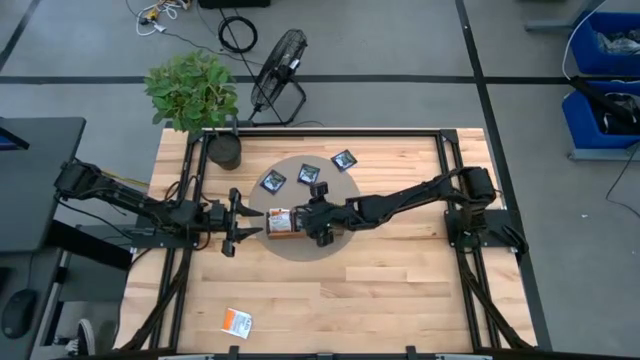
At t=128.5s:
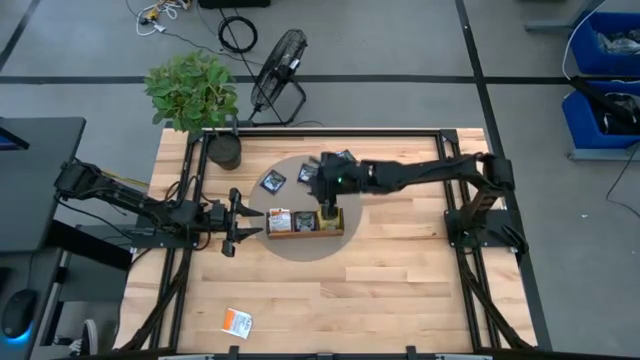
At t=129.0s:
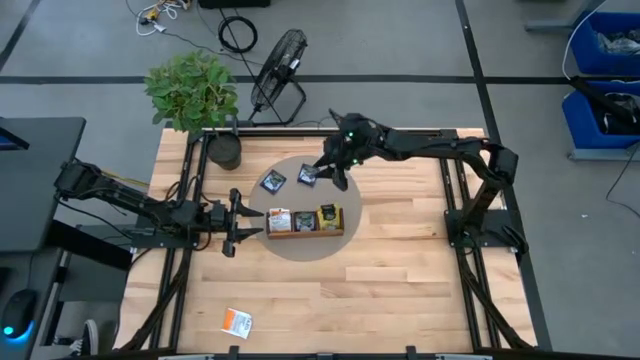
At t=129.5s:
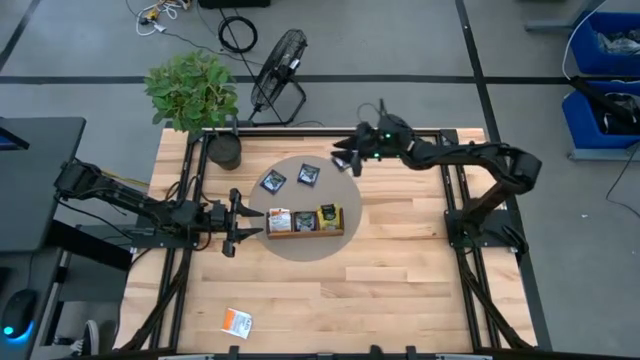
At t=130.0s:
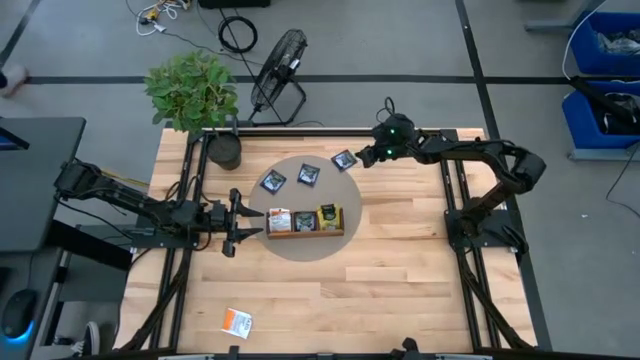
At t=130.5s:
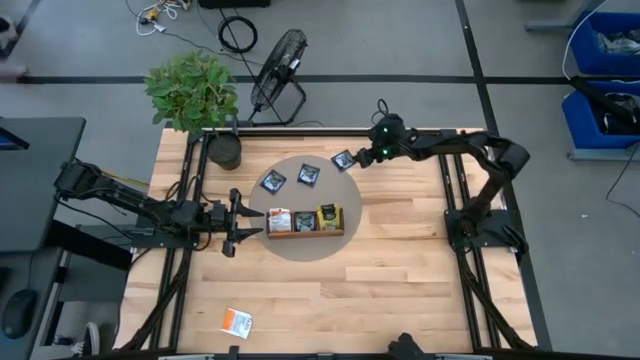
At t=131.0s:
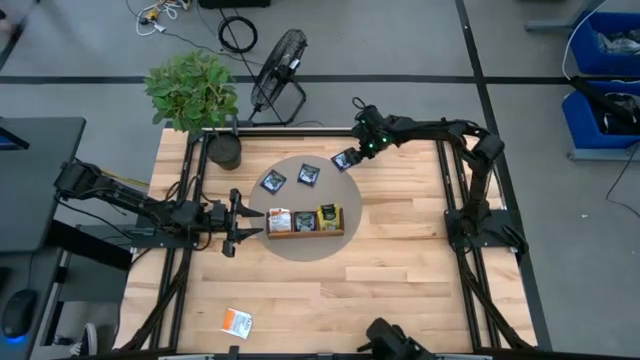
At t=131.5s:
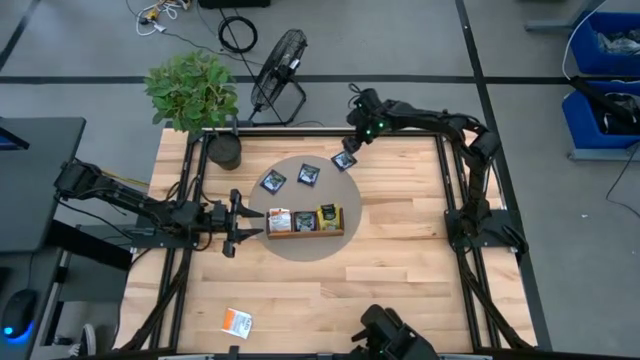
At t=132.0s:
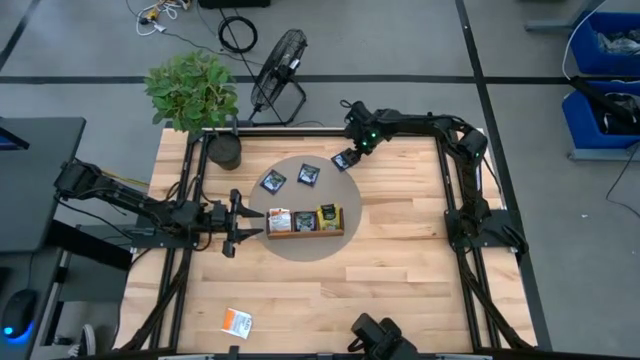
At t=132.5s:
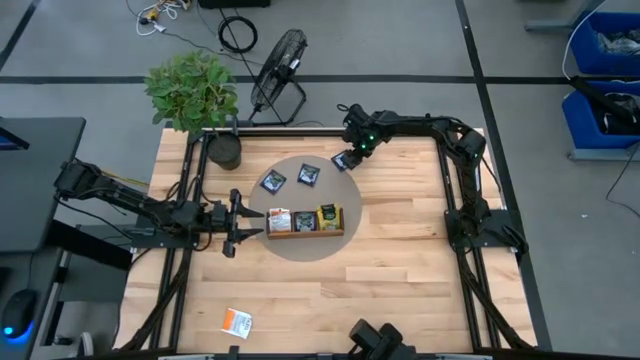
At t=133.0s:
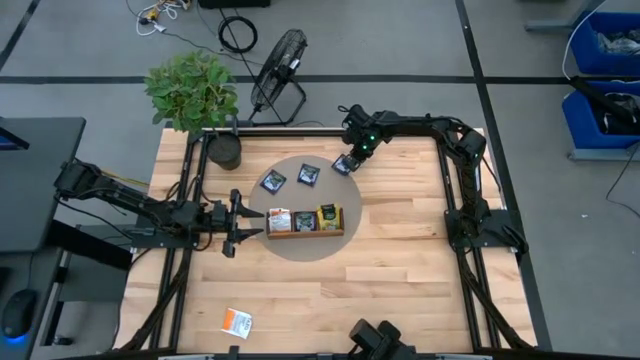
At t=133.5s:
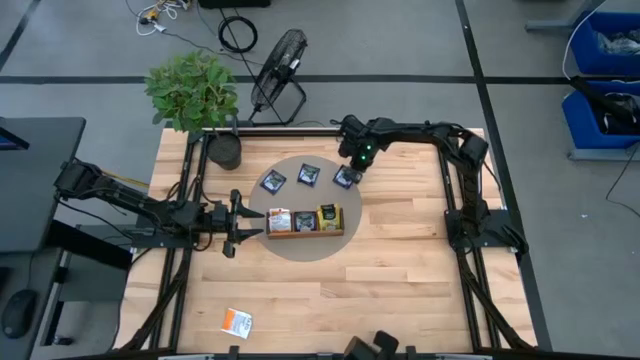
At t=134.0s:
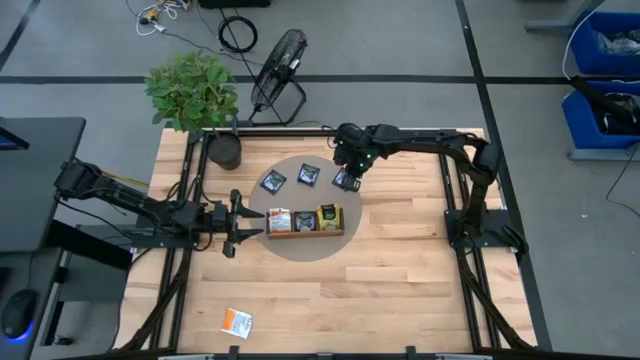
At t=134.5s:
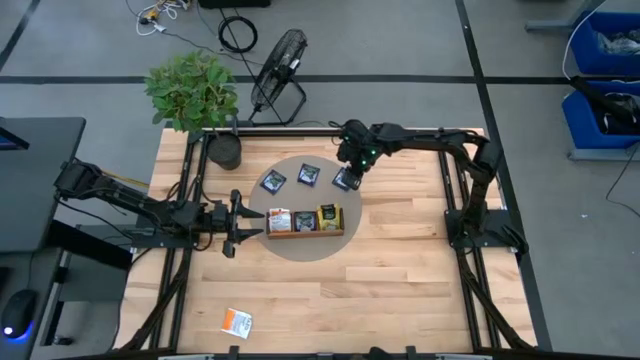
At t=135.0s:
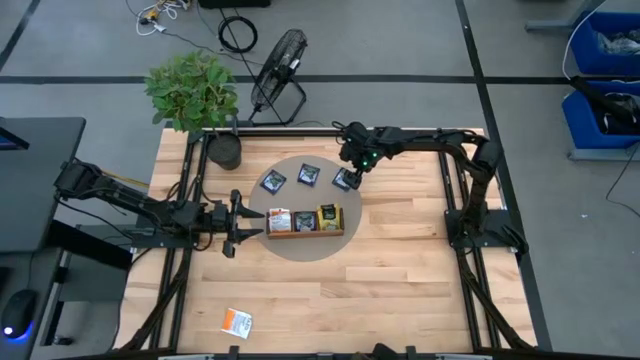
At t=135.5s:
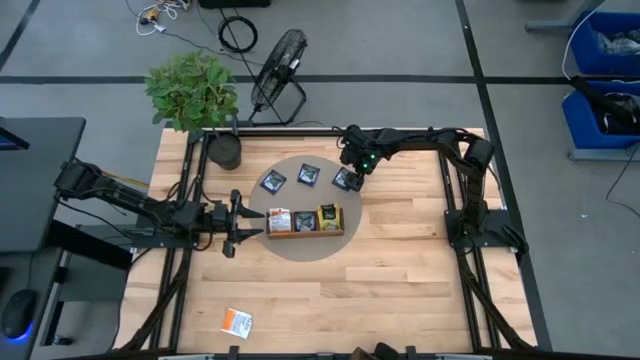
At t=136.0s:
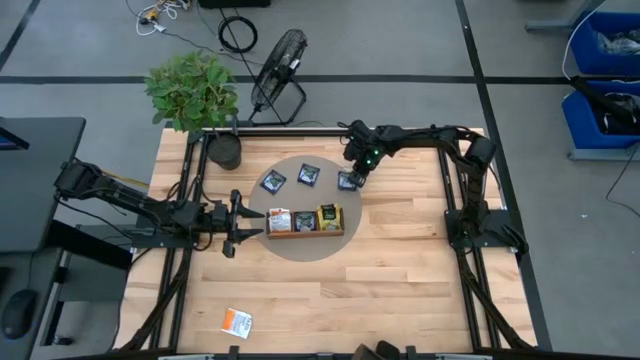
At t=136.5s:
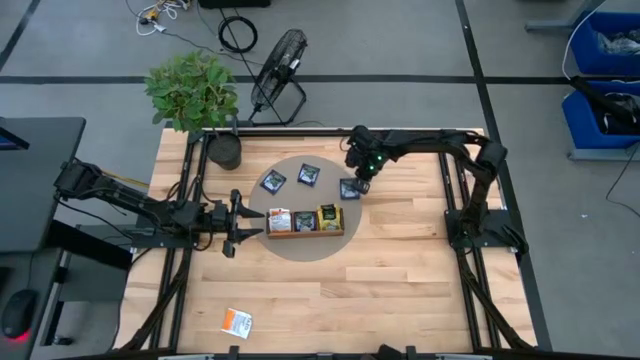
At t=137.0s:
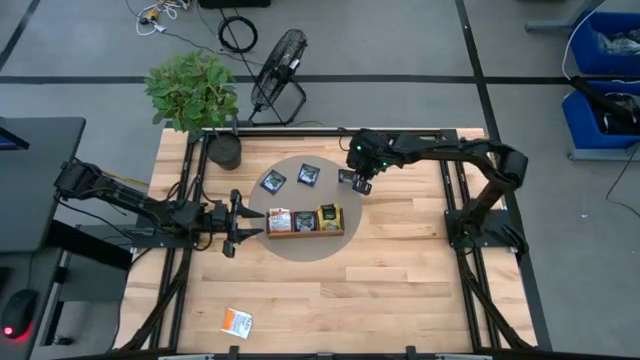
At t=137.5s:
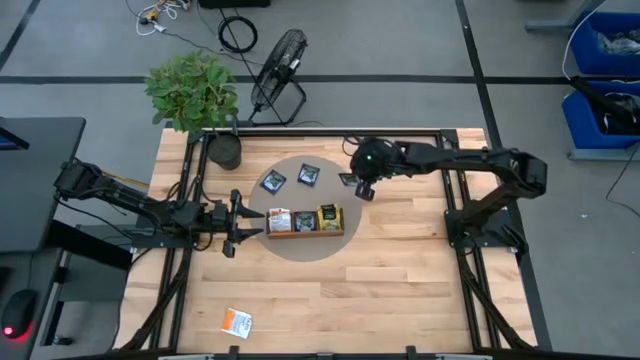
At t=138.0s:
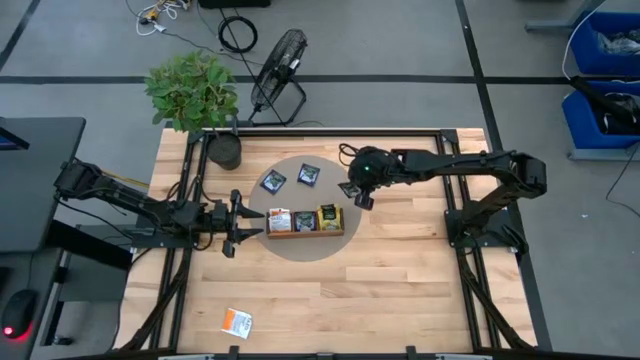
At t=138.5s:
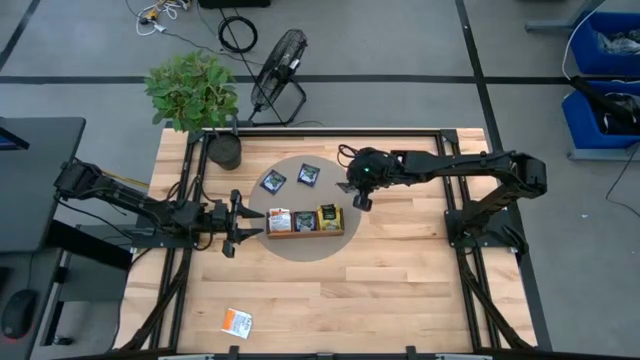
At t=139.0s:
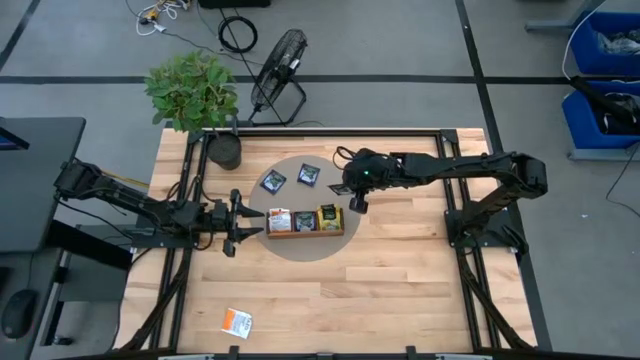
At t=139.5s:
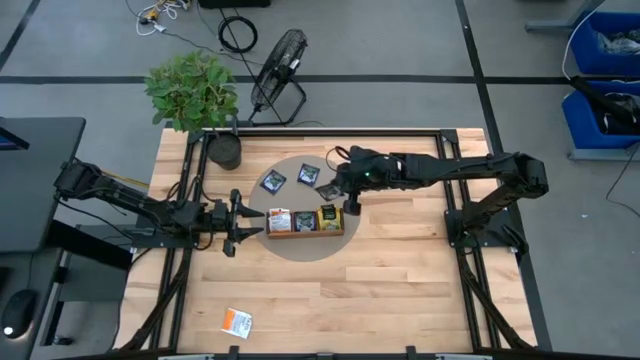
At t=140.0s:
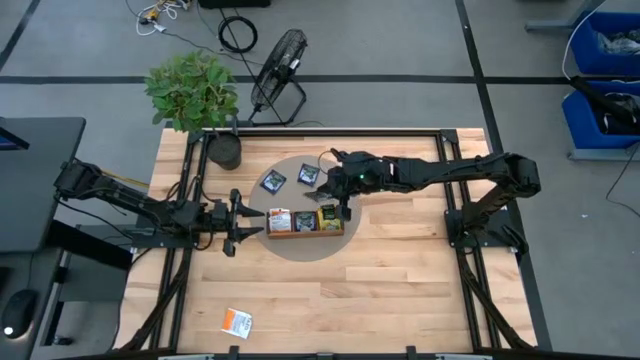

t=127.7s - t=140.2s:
Task: Pick & Place Tea
Put the top right purple tea bag into the middle compartment of the wooden organizer

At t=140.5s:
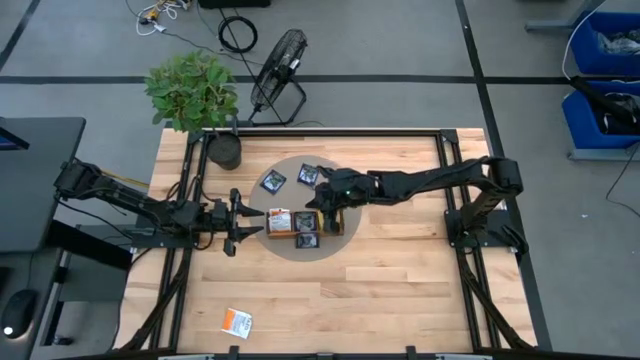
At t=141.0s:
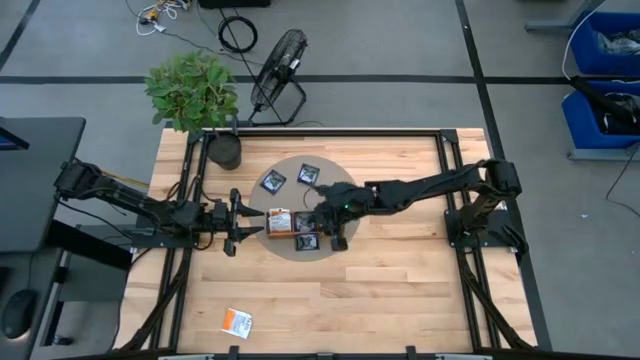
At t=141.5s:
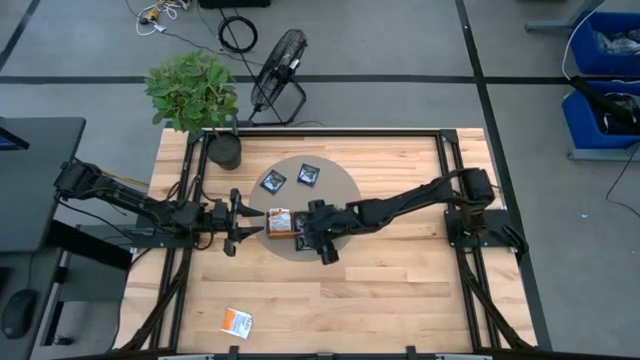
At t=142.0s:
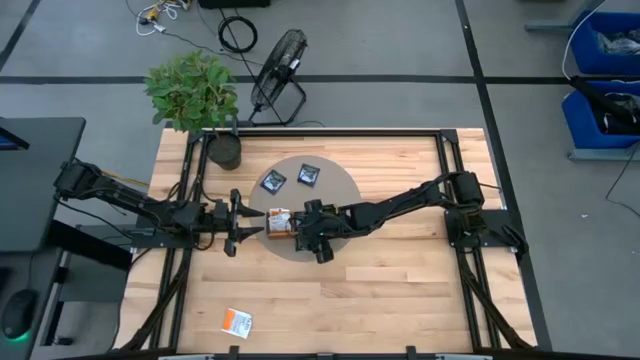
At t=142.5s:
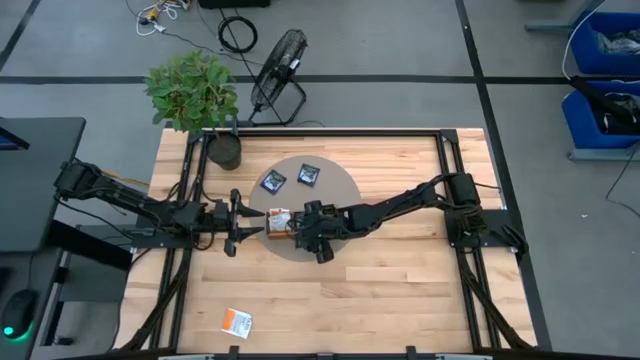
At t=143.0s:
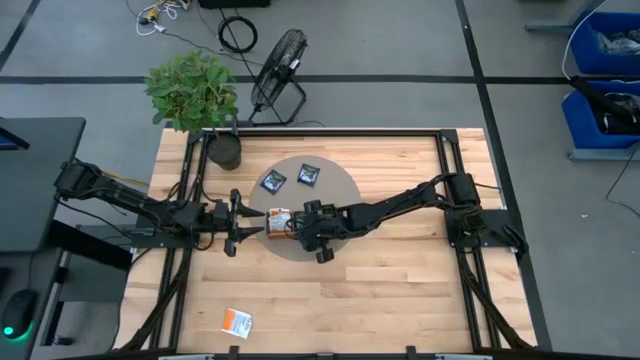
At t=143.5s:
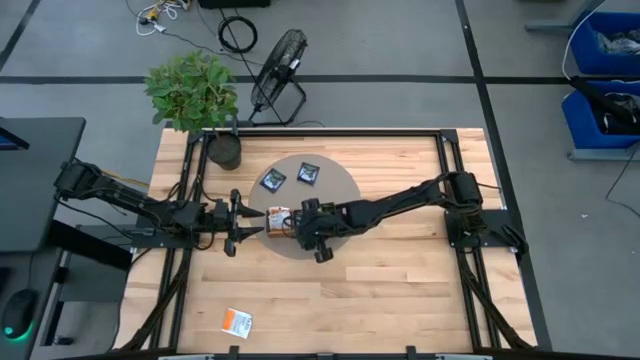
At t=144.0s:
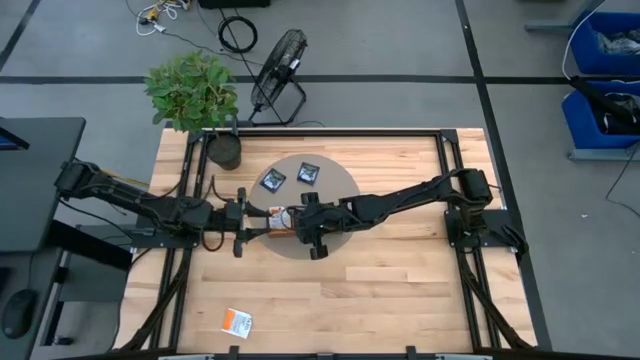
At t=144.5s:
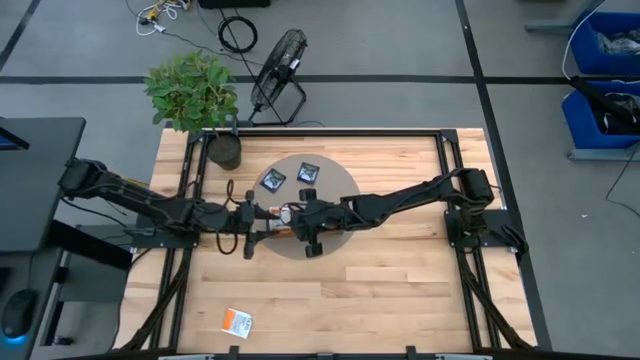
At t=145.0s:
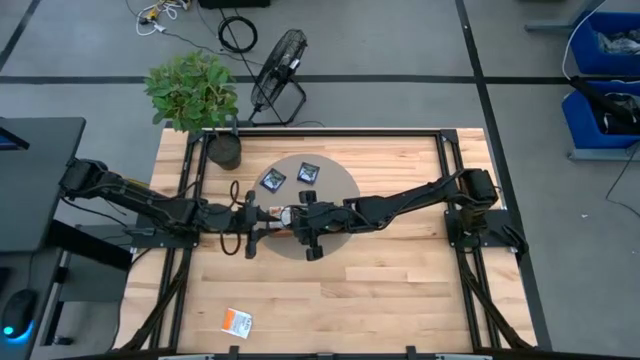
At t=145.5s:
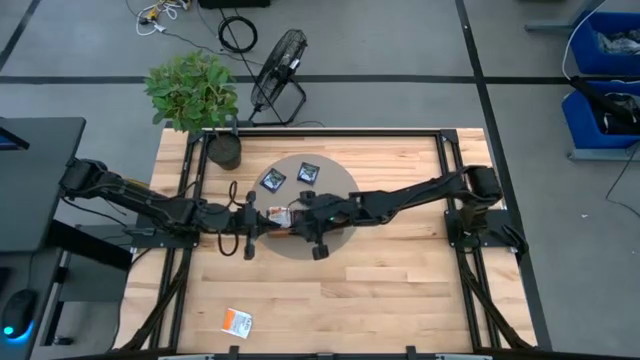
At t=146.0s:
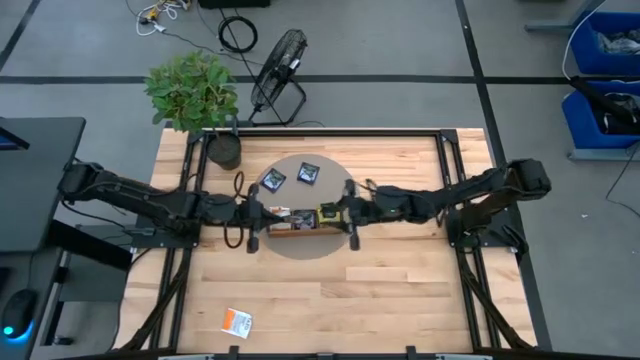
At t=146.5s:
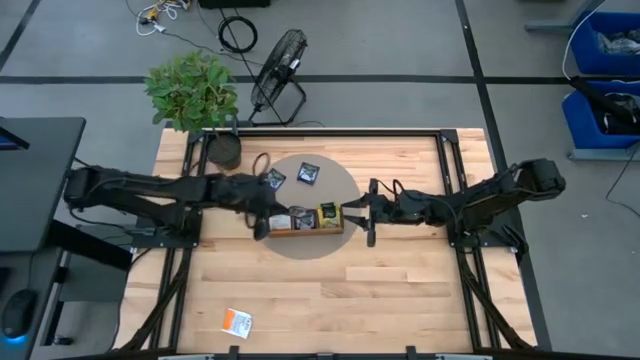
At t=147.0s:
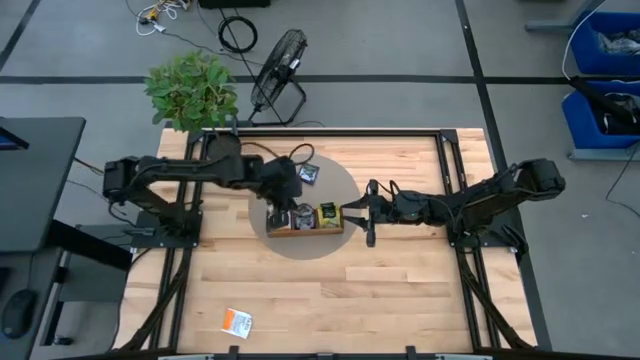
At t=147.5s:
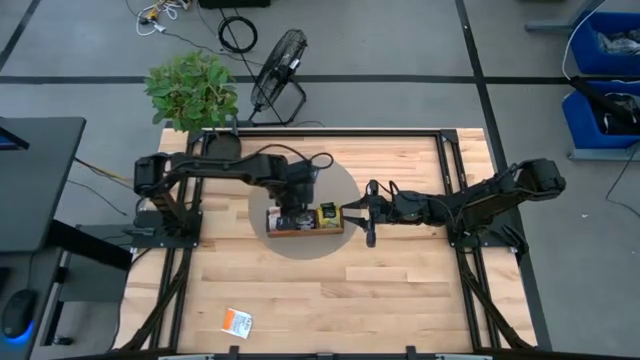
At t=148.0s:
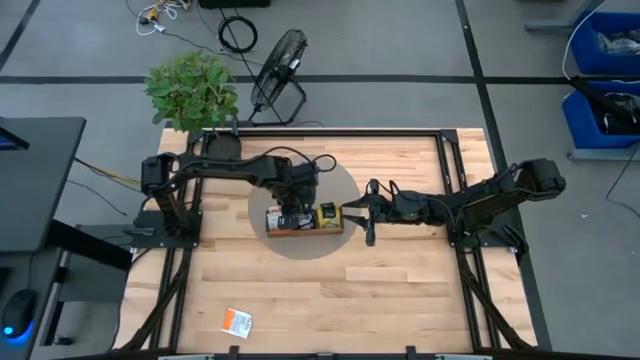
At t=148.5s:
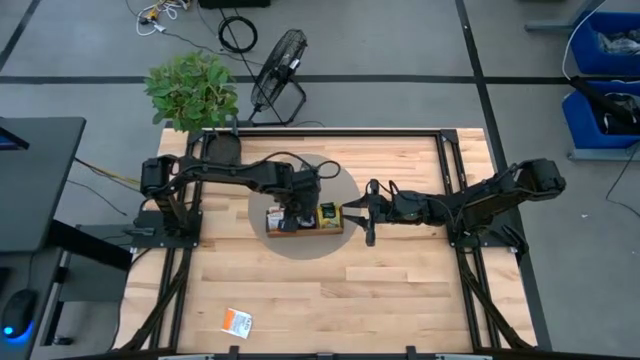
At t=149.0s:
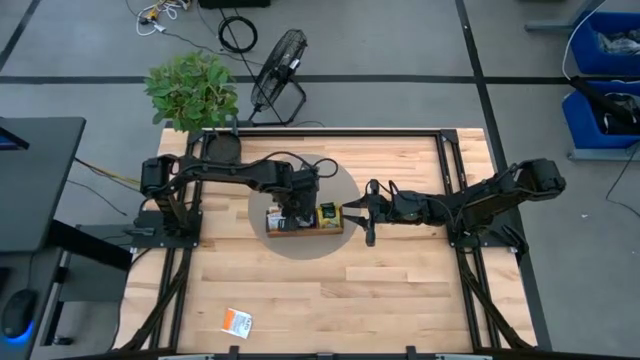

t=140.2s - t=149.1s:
Put the top right purple tea bag into the middle compartment of the wooden organizer
